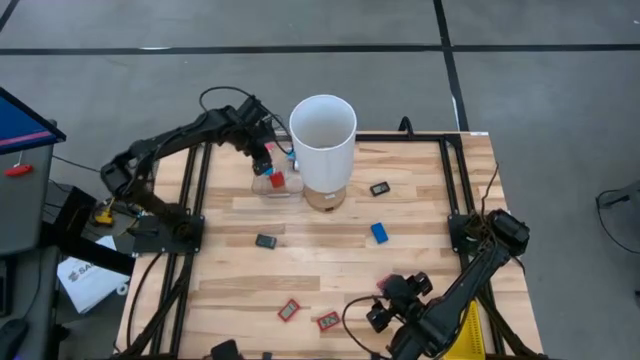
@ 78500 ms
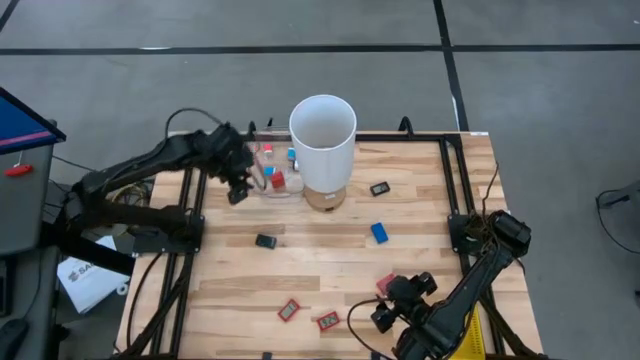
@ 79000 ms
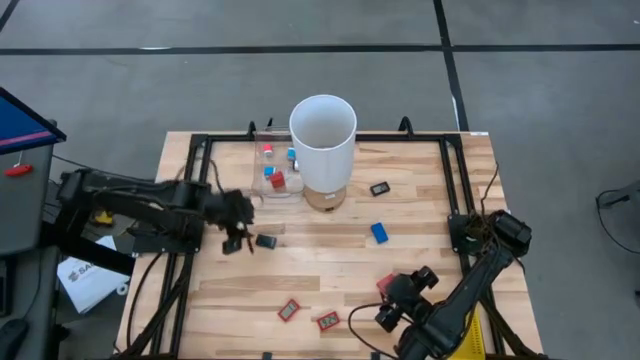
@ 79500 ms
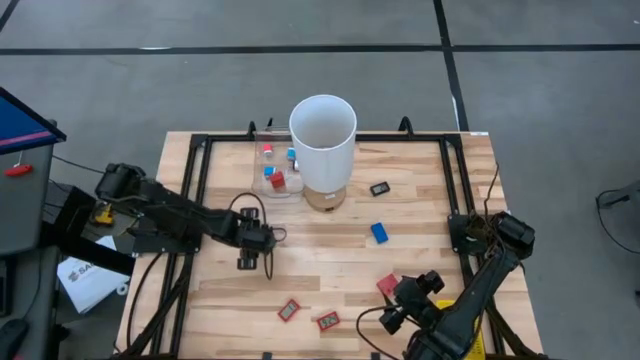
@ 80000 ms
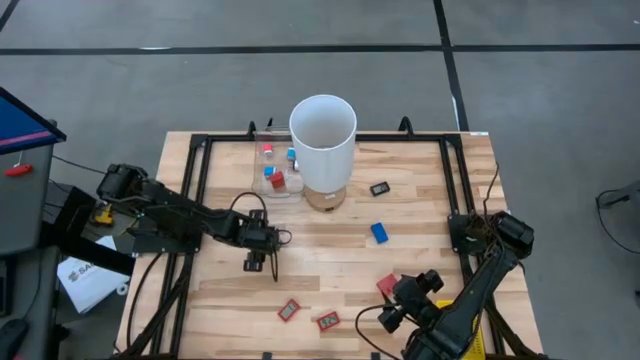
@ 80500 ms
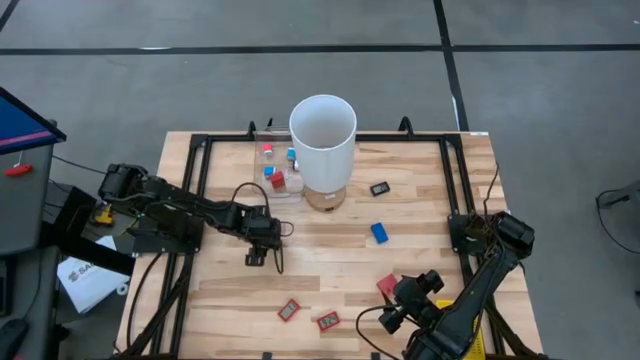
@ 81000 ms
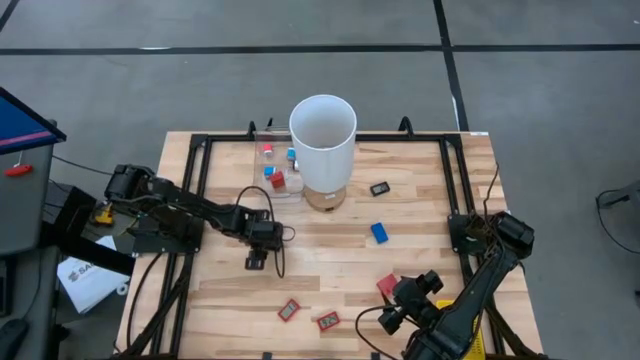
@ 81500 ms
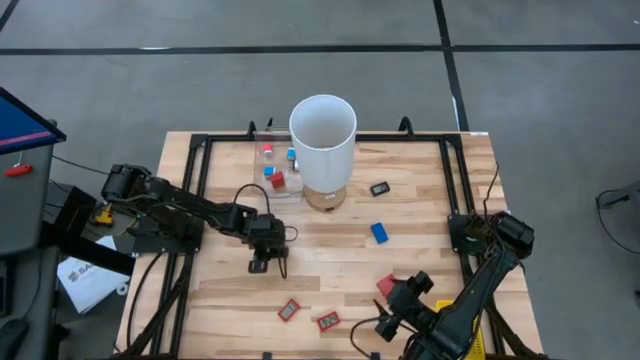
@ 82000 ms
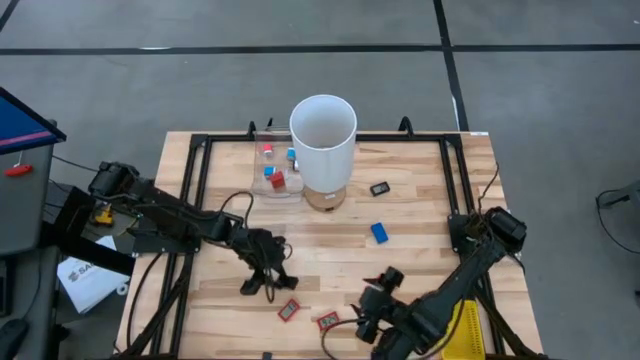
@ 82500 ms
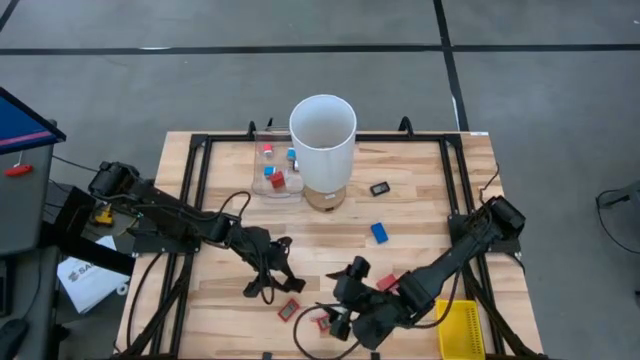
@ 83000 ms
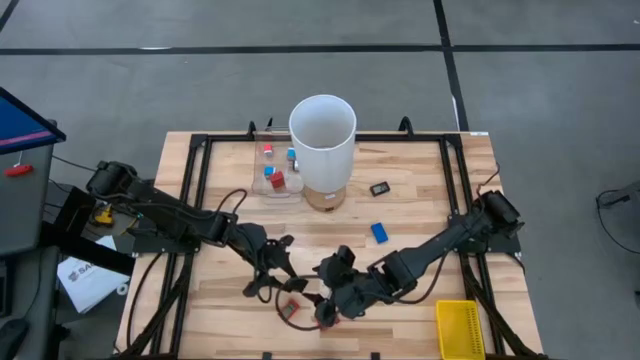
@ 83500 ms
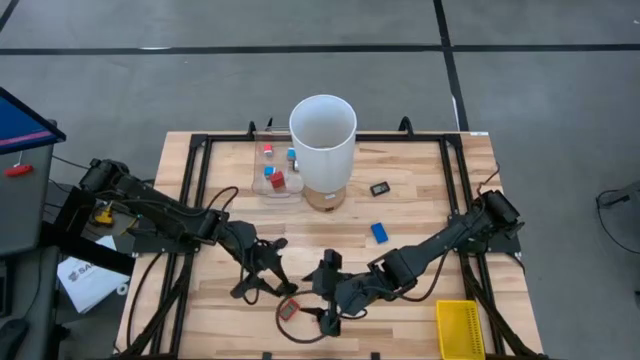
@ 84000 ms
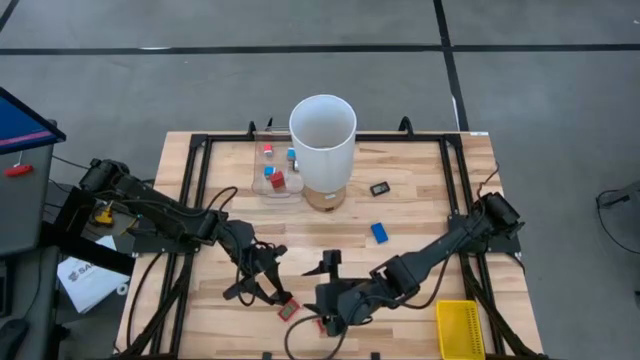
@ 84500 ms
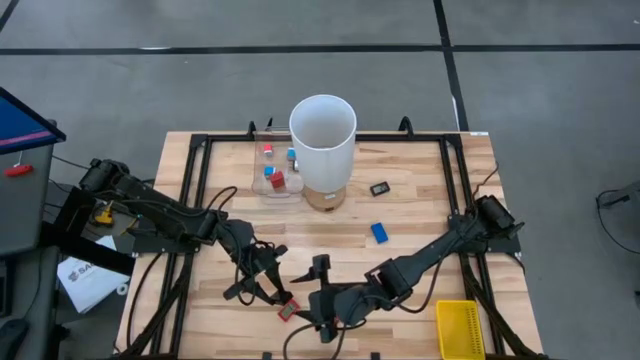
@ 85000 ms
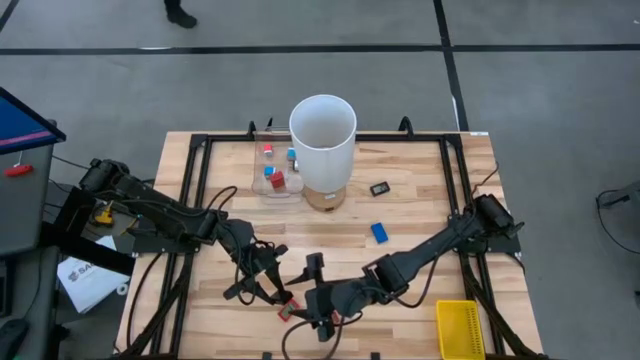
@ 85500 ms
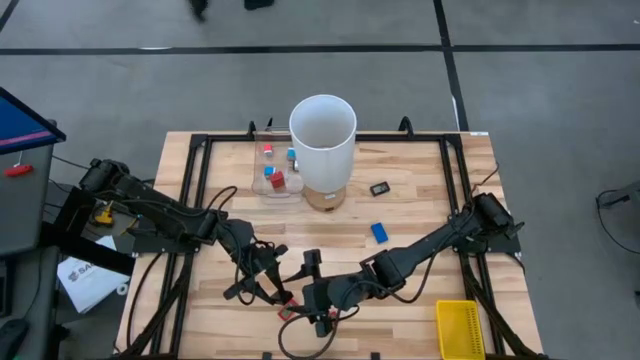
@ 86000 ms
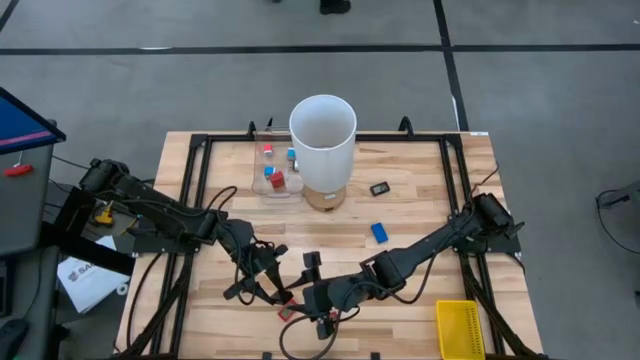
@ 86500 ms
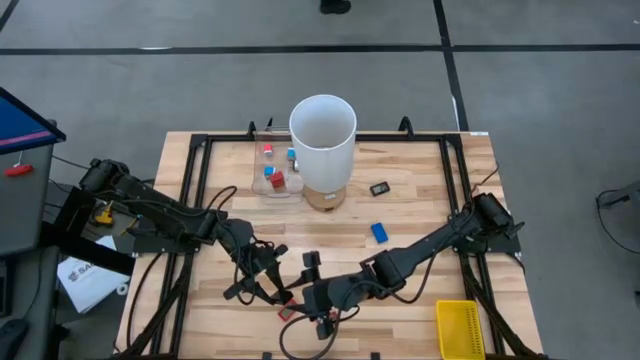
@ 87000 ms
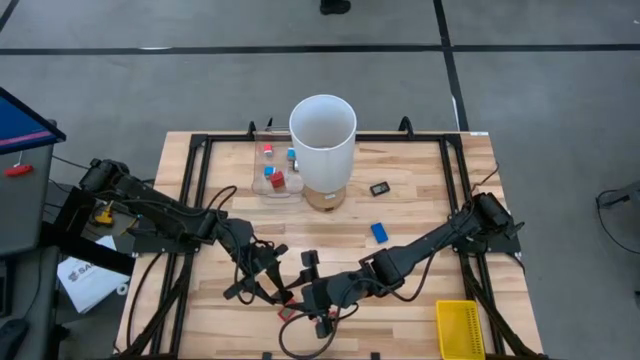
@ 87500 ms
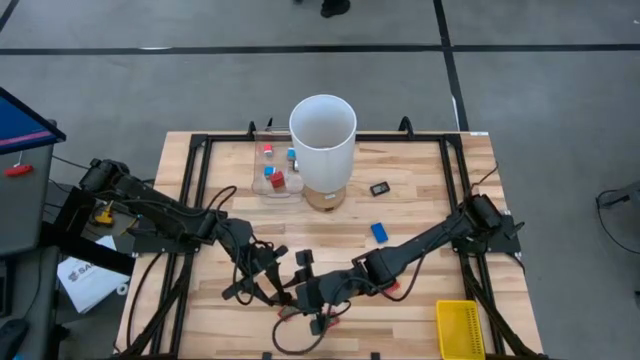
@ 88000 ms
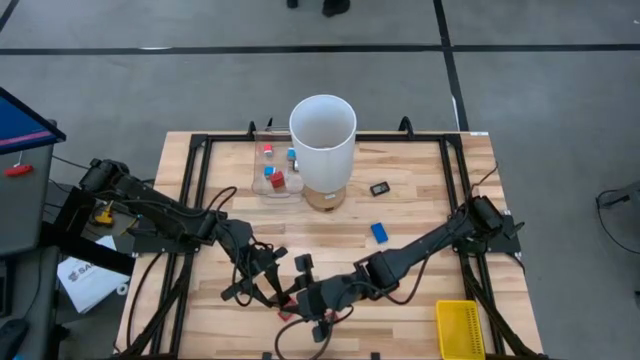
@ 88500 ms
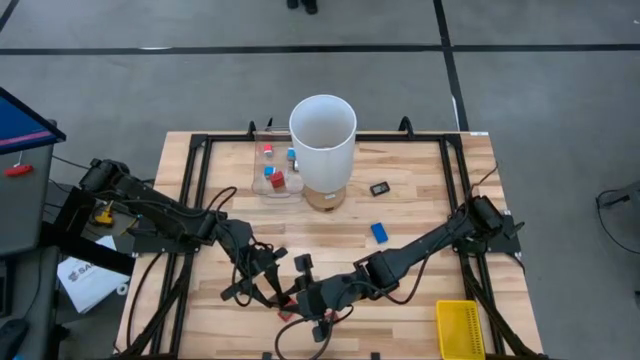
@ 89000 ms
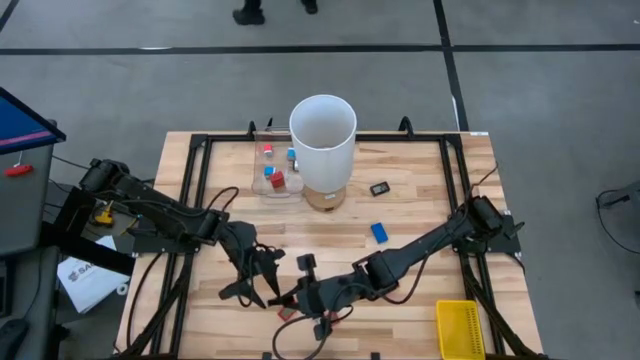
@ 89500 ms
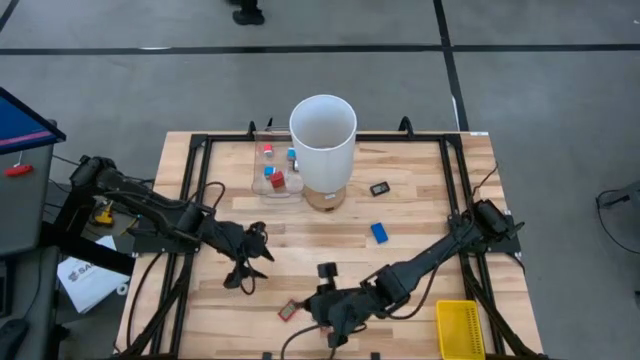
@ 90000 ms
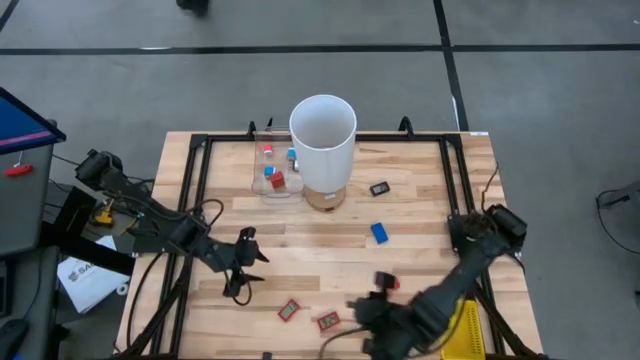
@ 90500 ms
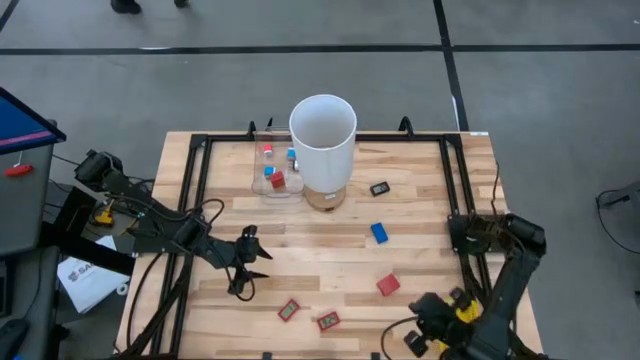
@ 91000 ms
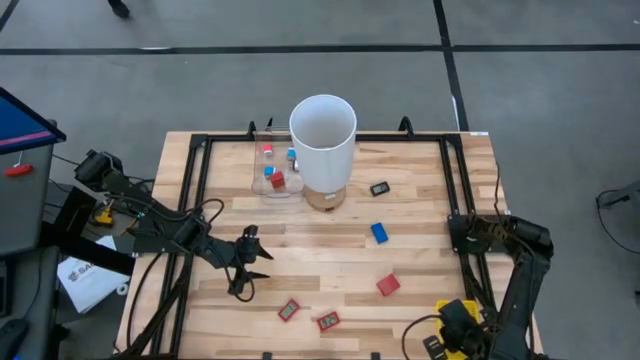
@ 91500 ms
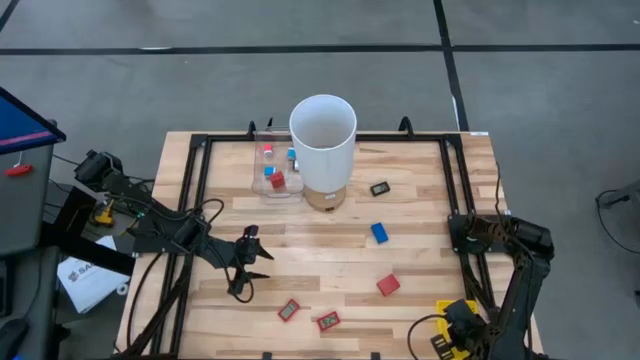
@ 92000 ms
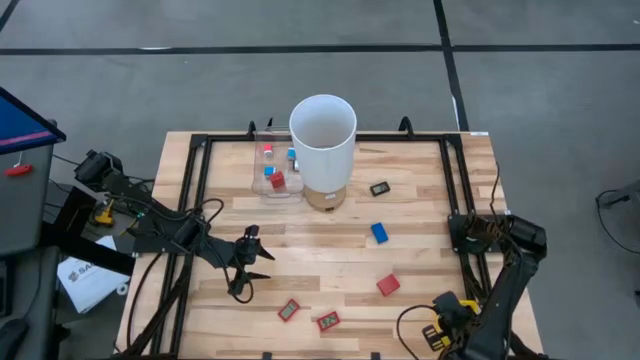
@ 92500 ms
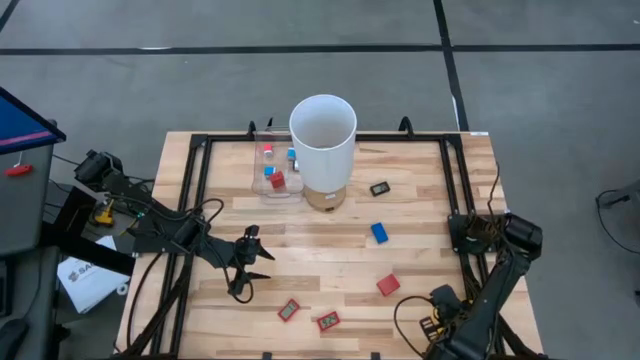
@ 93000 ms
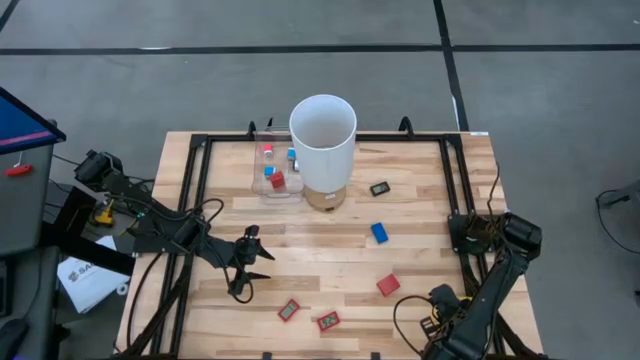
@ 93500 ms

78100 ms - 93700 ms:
Task: Pick & Place Office items
Put the bottom black digital timer into the yellow basket

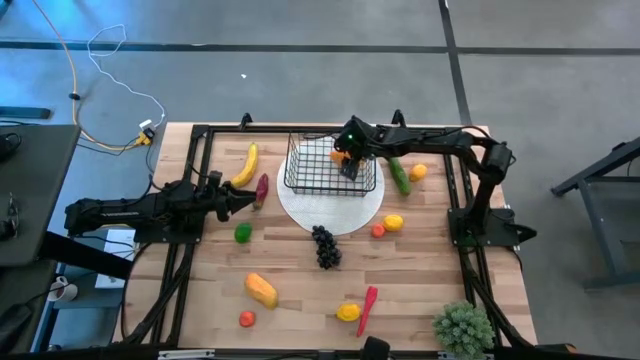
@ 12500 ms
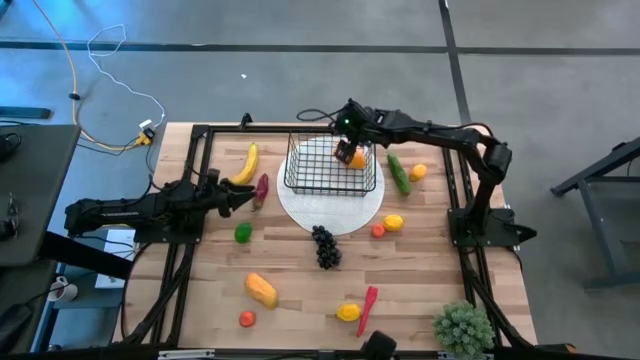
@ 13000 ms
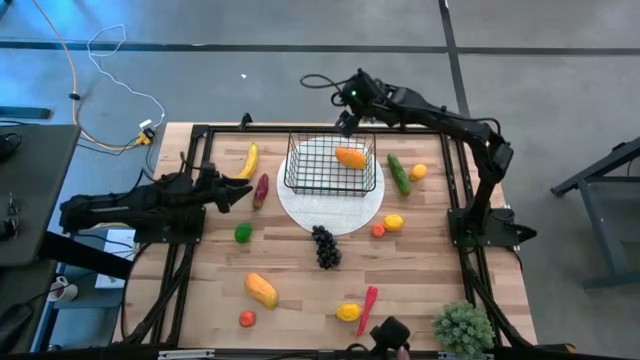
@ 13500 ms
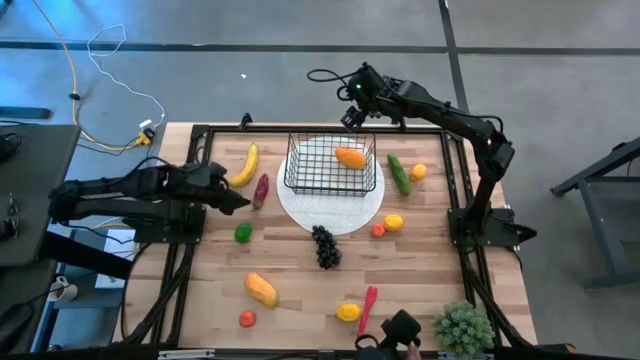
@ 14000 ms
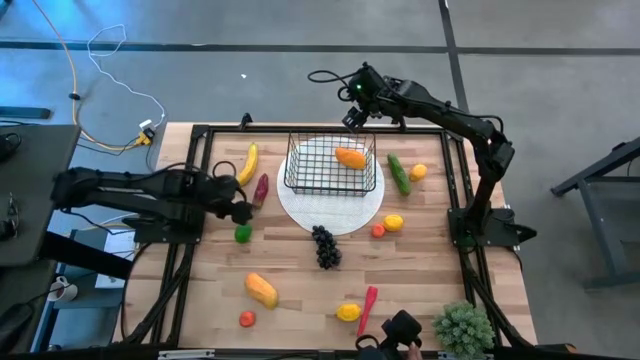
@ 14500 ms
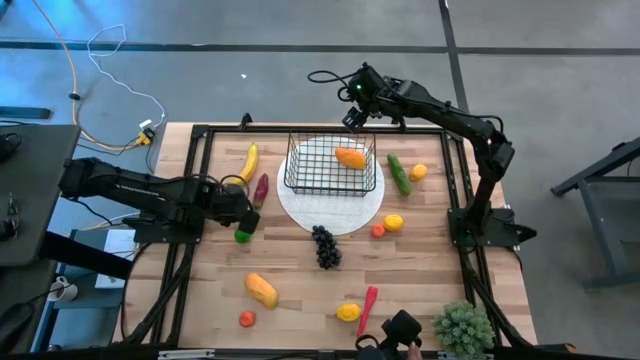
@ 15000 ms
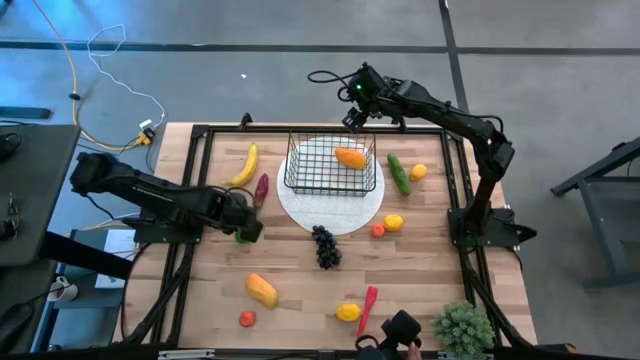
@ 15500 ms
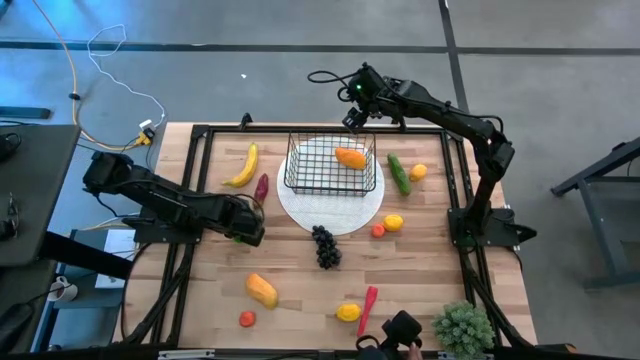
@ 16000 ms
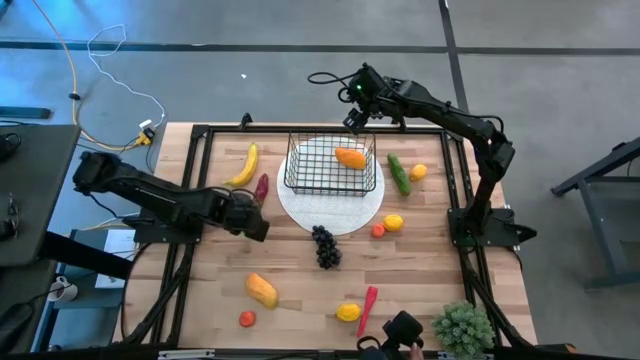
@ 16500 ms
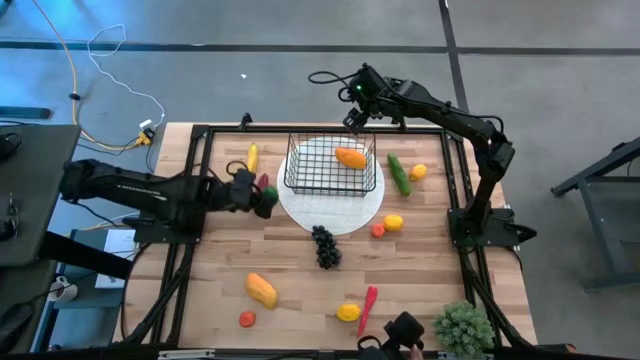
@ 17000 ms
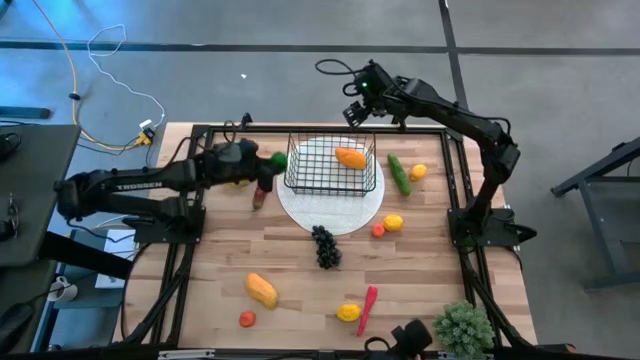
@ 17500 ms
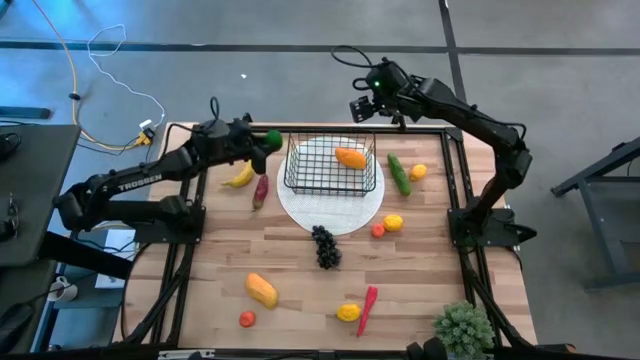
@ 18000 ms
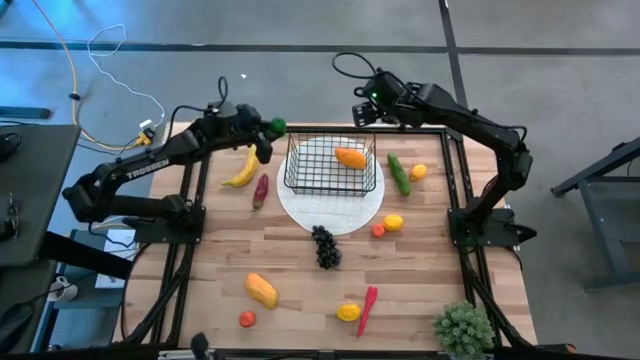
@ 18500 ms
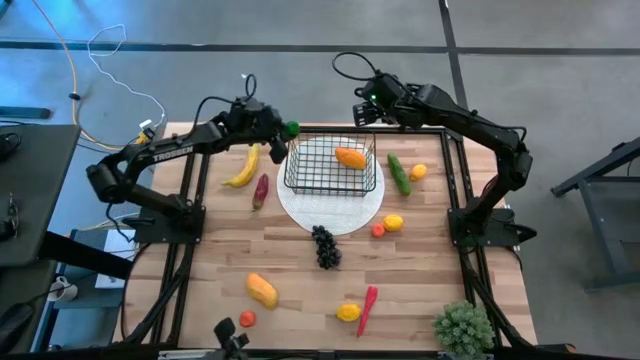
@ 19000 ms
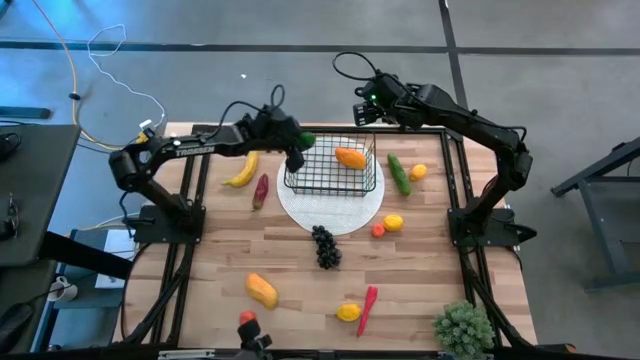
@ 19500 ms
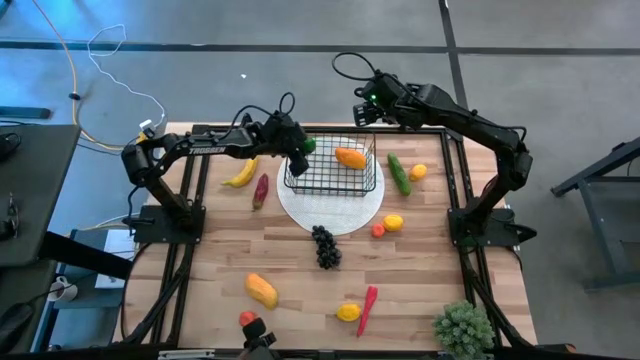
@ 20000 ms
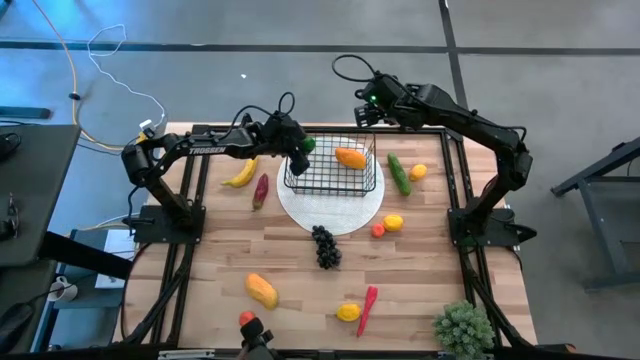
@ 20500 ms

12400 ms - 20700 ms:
Task: Build produce basket
Put the green lime into the wire basket
